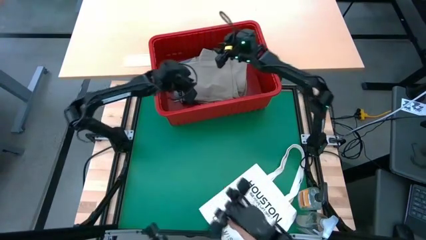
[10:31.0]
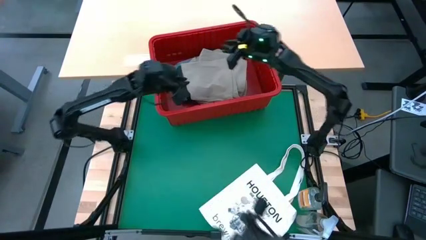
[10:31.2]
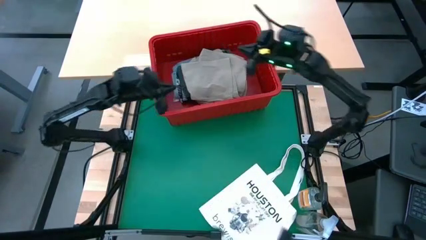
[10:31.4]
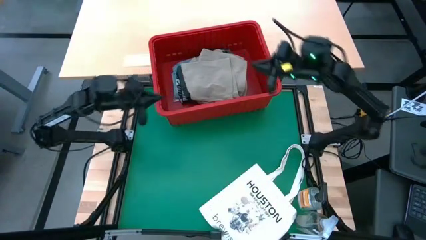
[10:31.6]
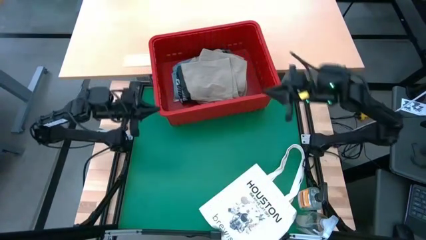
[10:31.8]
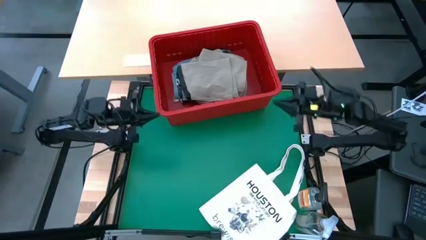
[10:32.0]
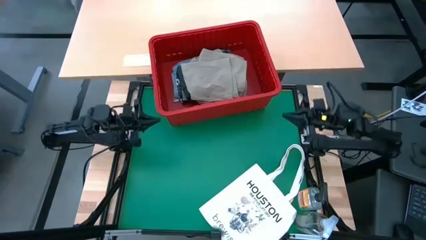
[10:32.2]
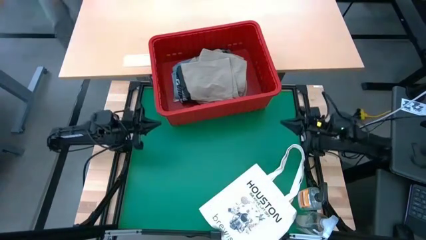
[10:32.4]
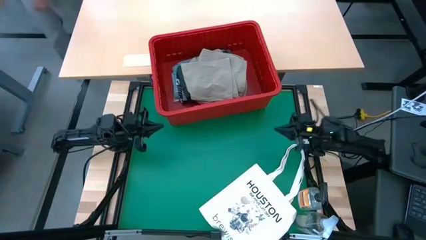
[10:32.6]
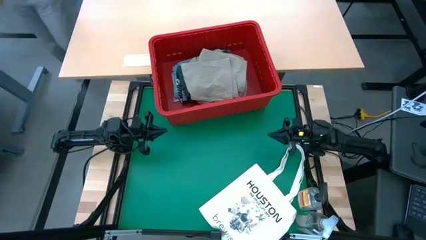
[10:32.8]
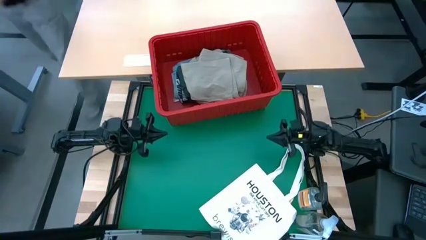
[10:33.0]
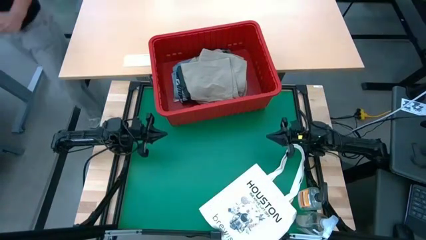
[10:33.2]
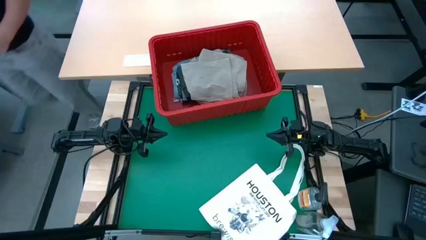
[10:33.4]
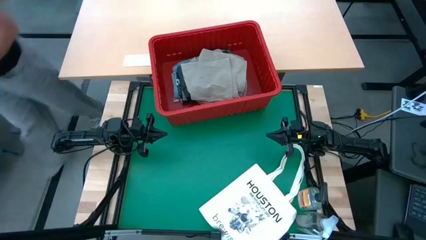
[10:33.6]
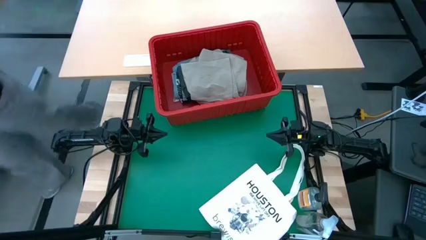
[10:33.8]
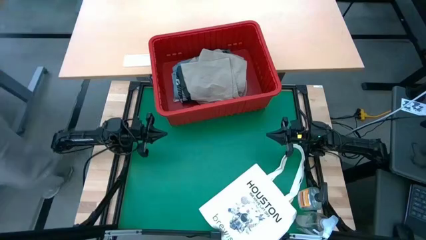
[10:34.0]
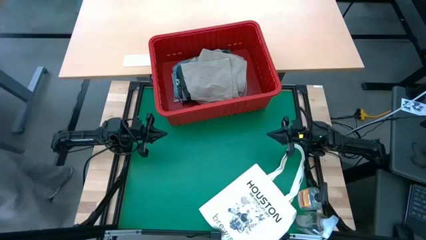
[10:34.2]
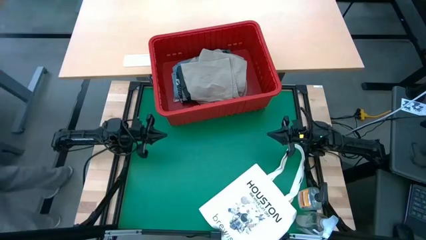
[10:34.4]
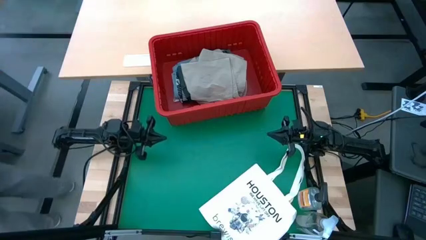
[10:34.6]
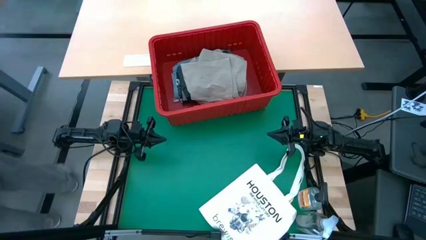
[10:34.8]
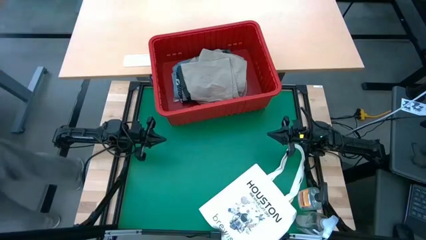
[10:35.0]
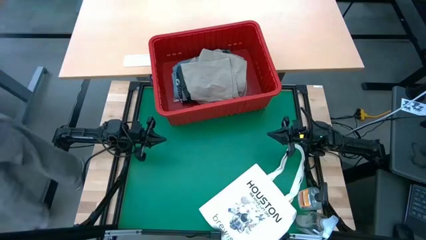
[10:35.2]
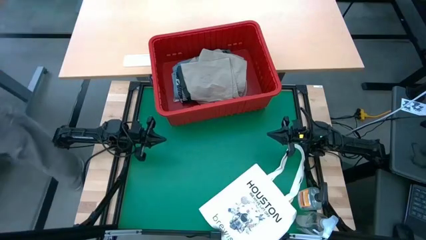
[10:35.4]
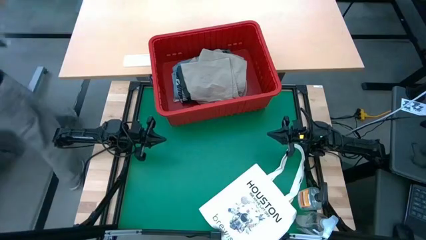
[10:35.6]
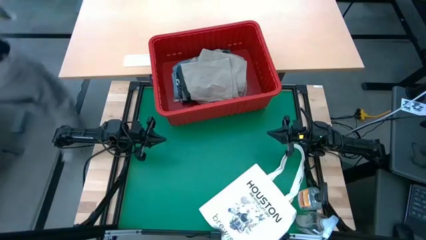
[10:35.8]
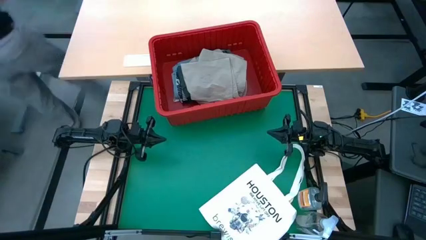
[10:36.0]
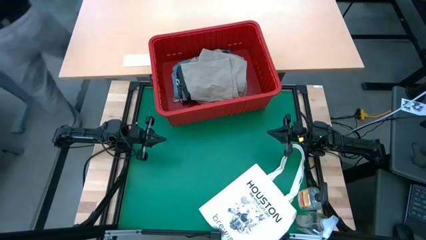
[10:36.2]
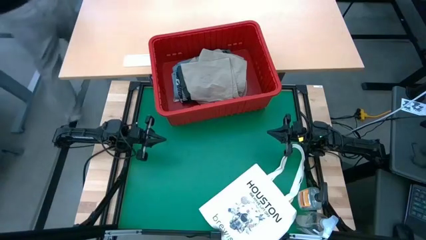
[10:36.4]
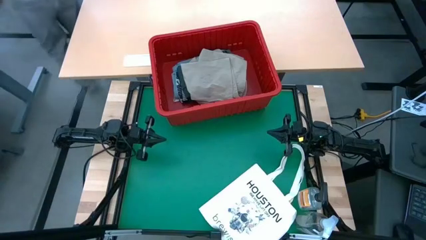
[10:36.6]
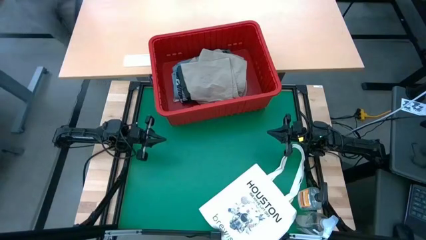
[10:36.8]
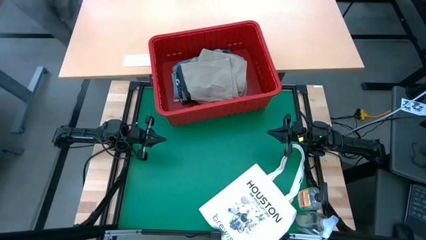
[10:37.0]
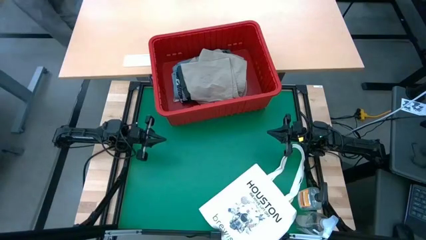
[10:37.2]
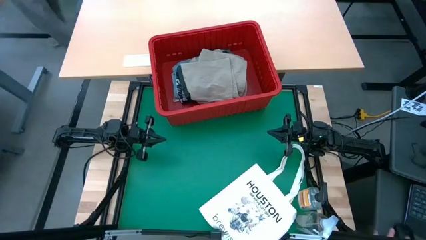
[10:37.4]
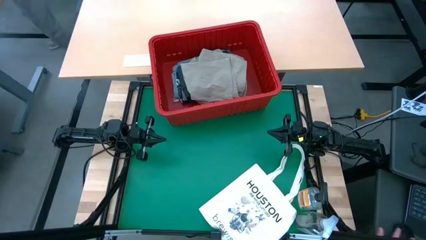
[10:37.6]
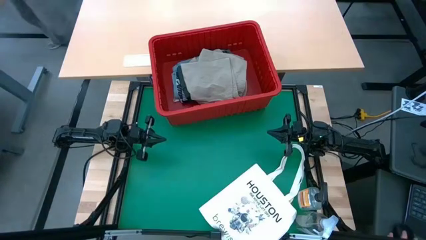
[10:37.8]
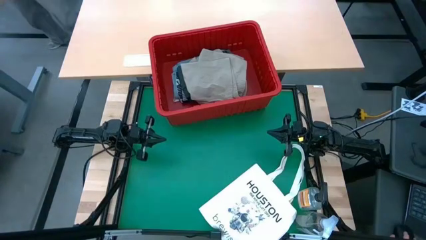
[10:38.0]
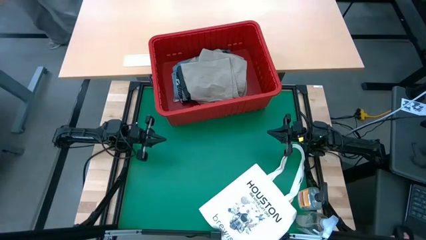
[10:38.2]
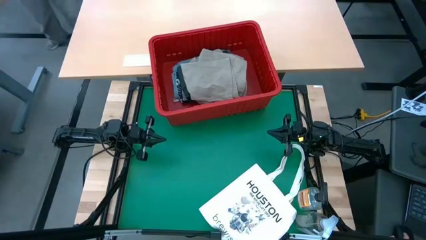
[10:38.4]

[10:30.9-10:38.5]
Task: Fold Laundry from Bin
Return to Home Position

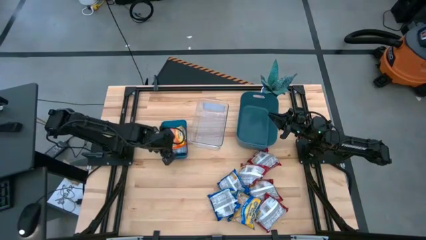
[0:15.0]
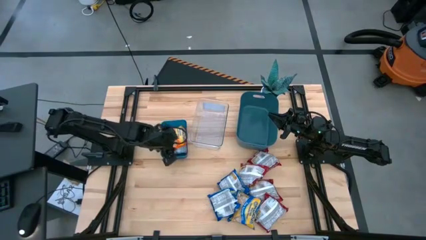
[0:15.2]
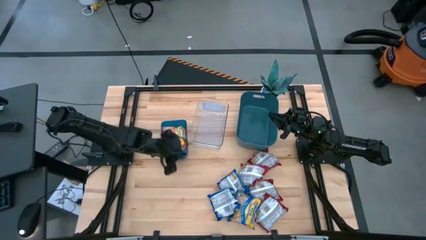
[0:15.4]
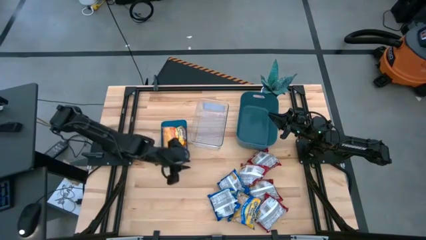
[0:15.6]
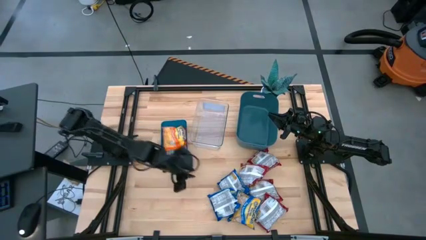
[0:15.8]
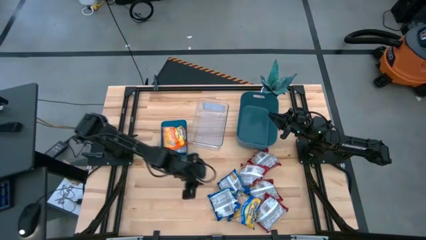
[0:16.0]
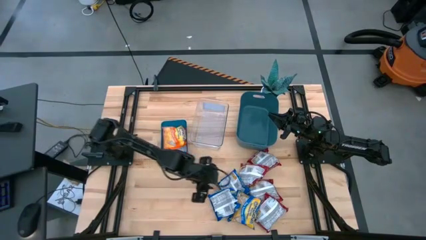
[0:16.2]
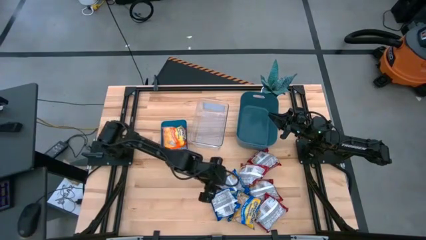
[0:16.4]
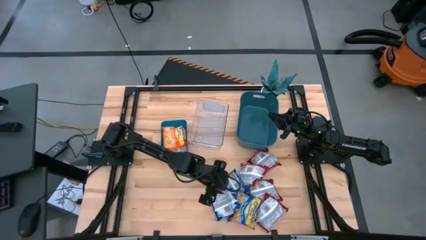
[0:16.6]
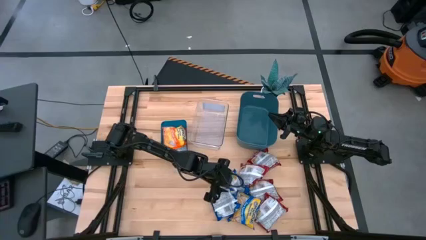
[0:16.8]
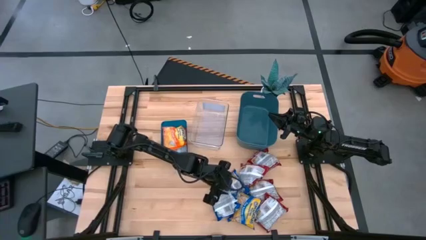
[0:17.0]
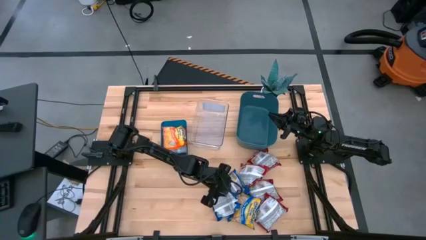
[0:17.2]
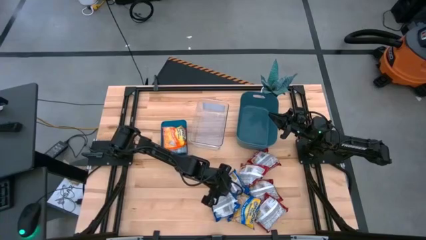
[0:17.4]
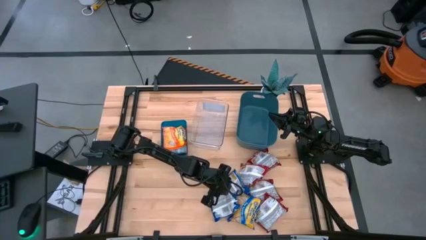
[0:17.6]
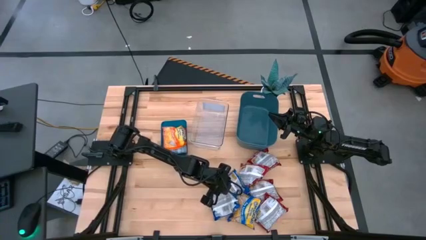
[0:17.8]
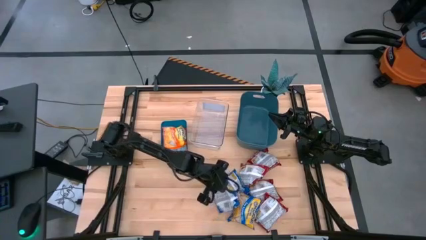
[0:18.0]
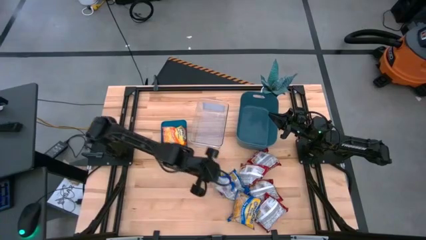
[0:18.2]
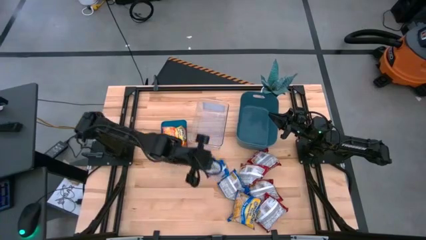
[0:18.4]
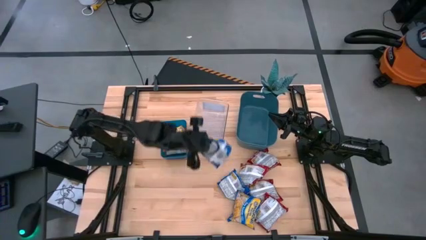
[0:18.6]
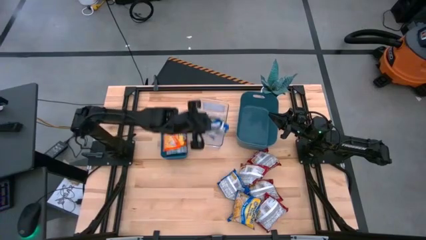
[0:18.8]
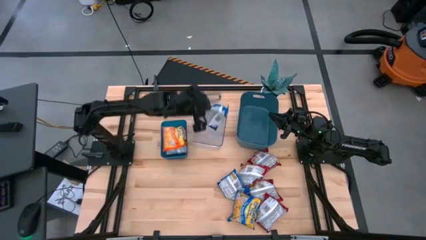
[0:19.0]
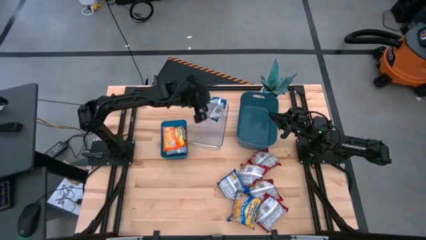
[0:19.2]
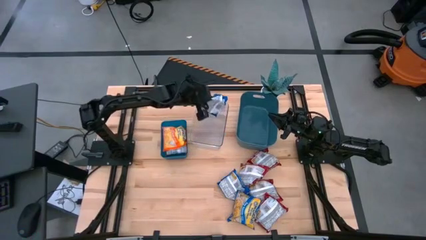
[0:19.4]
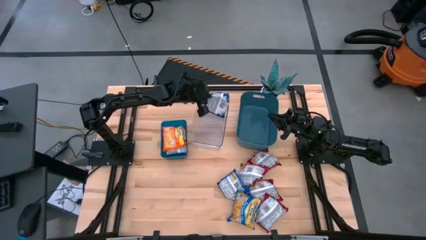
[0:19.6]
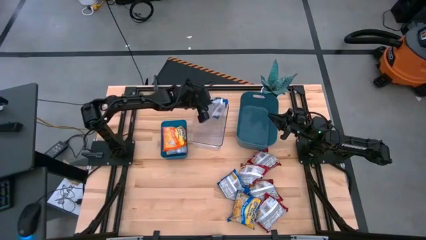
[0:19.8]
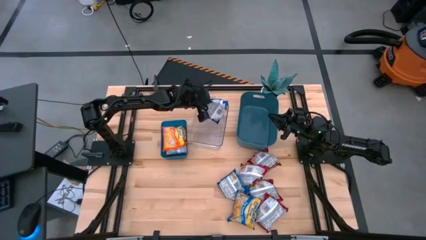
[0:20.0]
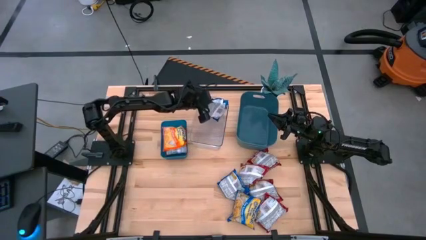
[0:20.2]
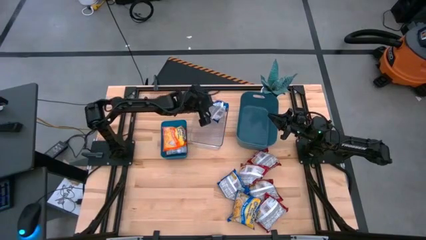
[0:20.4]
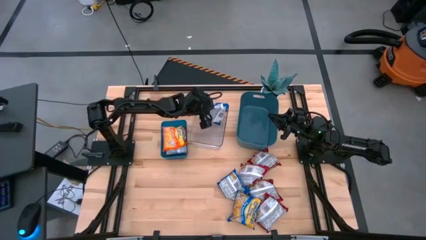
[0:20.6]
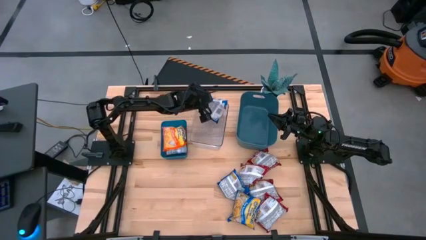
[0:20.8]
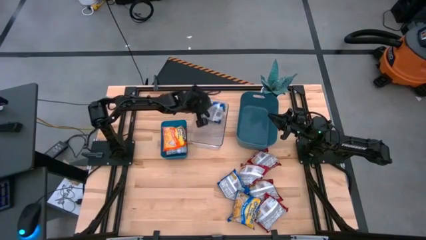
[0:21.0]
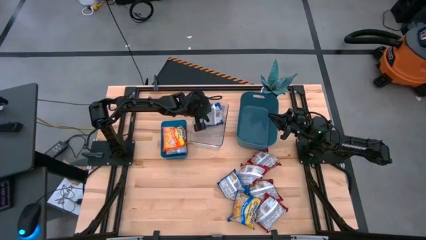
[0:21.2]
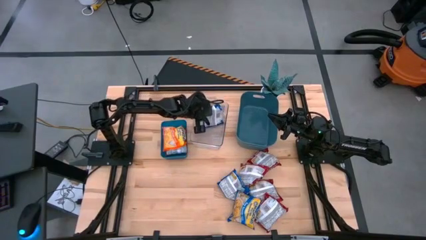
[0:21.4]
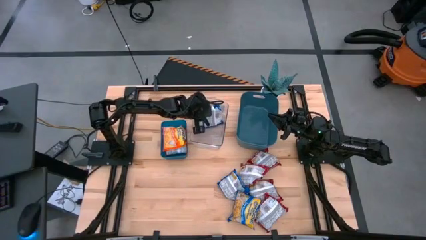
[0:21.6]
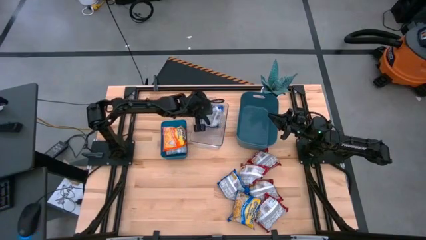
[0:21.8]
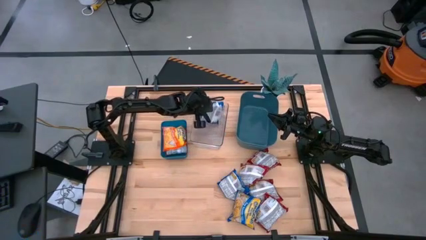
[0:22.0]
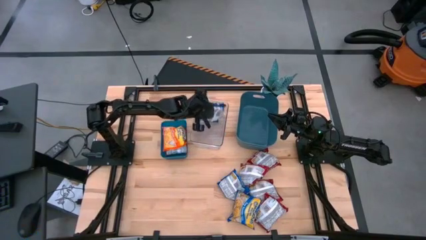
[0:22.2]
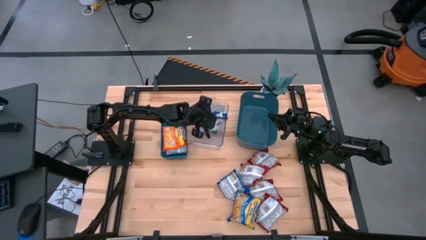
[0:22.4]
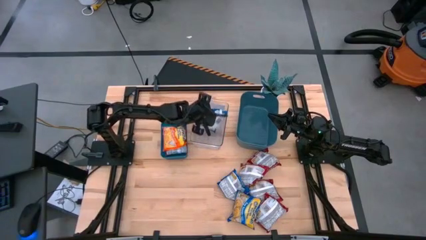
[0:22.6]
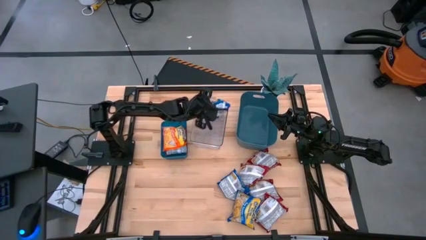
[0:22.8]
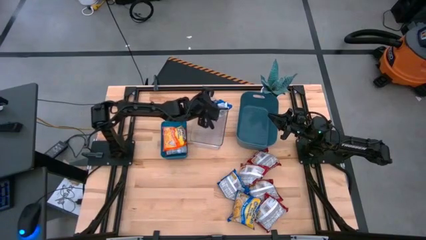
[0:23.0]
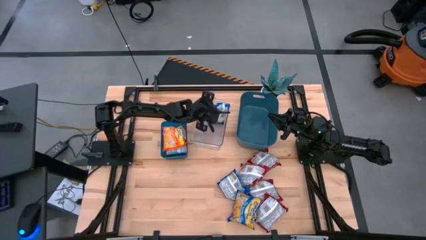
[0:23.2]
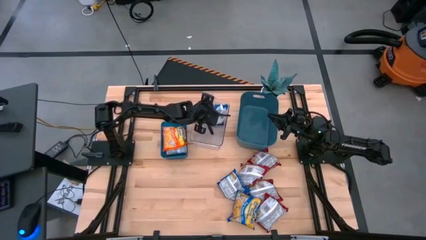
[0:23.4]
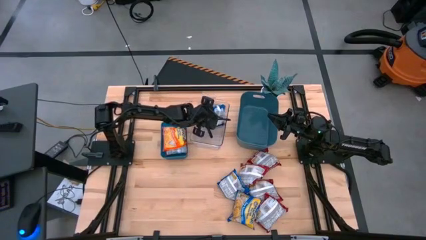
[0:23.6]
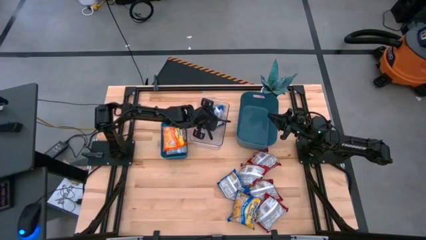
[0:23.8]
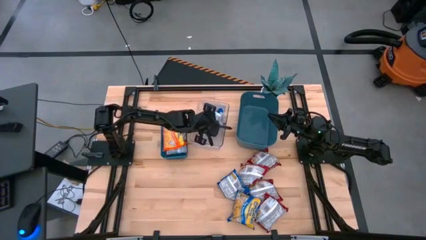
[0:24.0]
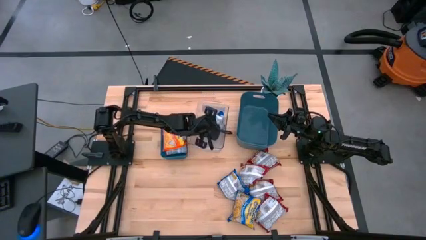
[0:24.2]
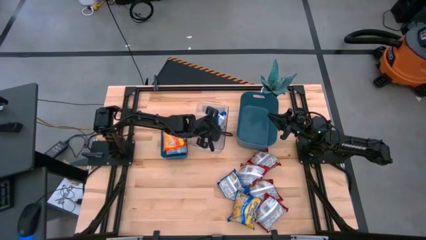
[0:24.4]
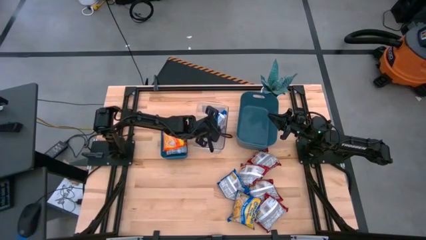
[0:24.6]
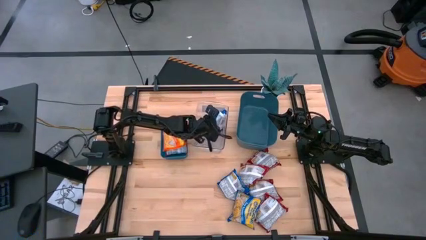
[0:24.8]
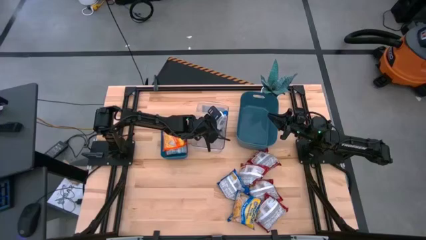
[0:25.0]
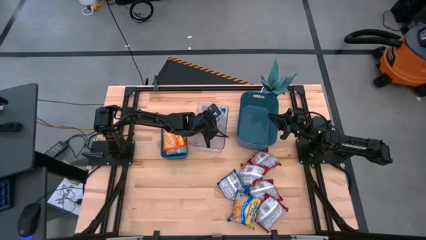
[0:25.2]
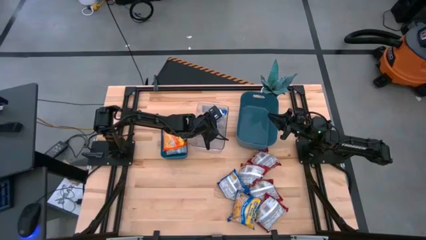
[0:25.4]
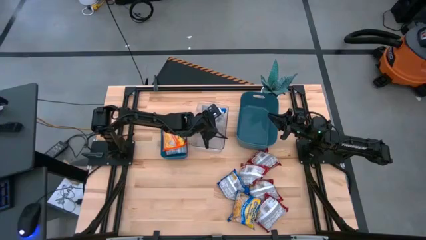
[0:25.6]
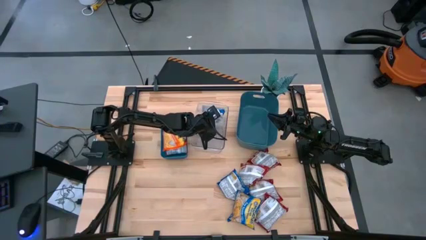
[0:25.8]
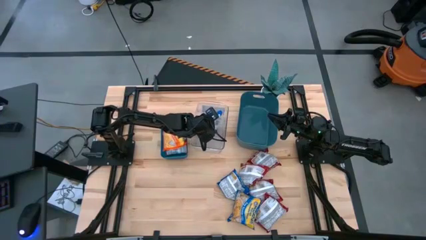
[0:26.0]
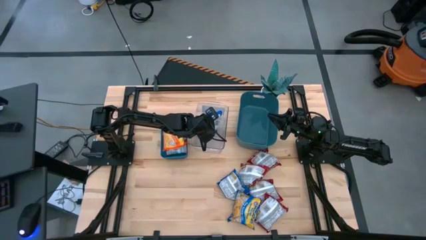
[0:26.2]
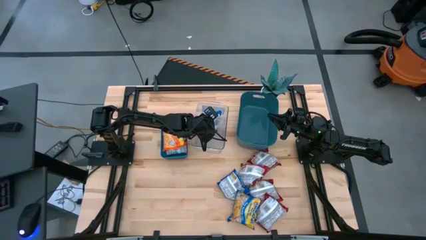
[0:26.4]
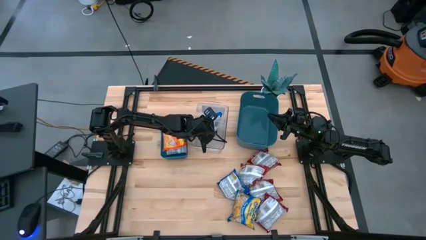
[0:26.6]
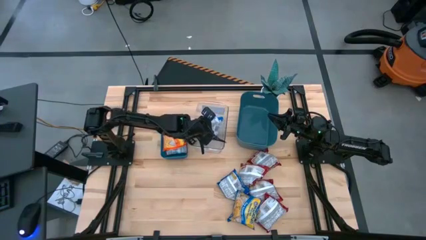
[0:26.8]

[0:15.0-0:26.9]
Task: Sort Maruchan noodles
Put the blue noodle pack into the transparent bin
